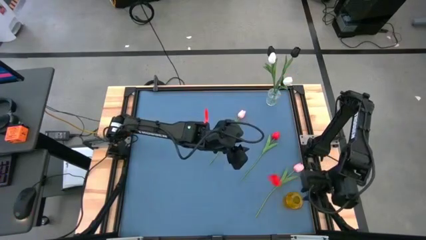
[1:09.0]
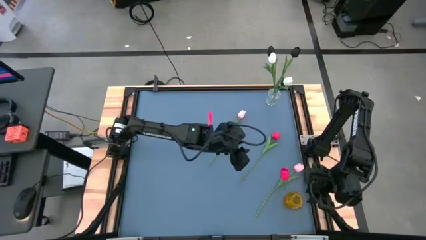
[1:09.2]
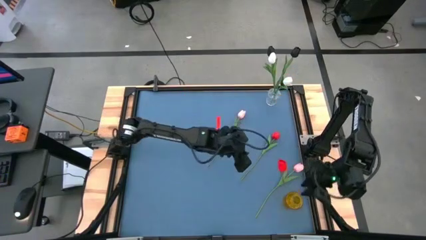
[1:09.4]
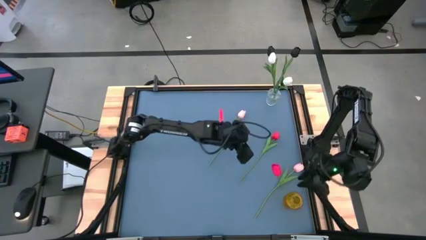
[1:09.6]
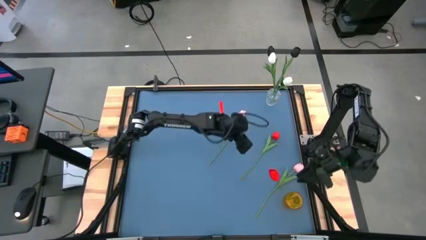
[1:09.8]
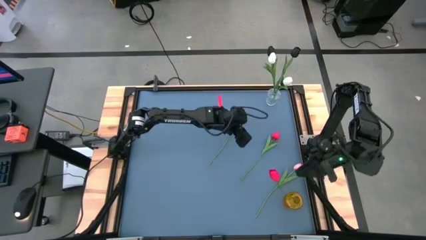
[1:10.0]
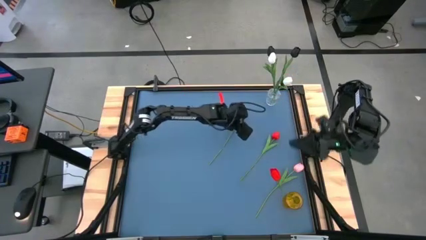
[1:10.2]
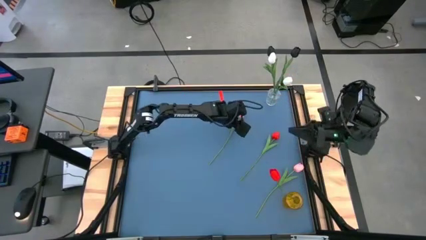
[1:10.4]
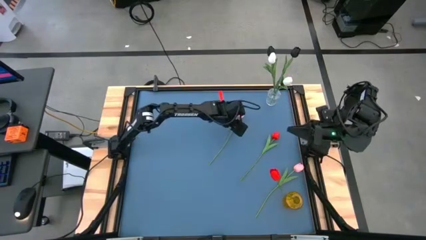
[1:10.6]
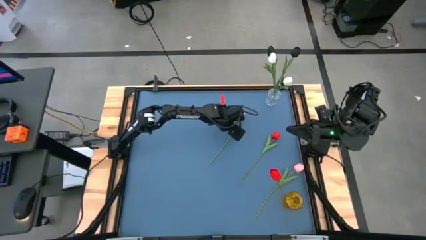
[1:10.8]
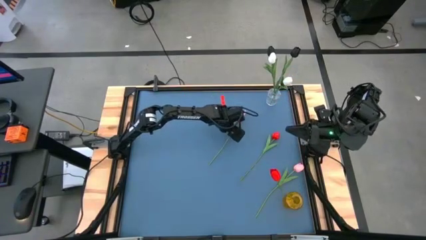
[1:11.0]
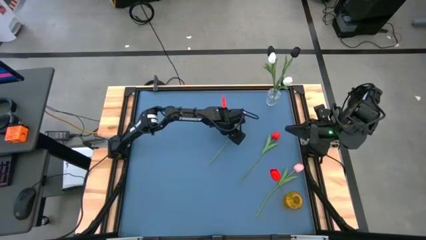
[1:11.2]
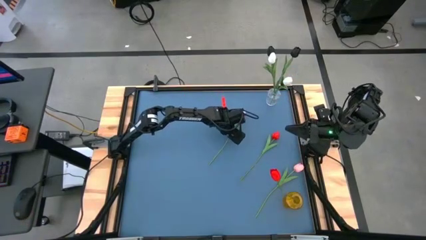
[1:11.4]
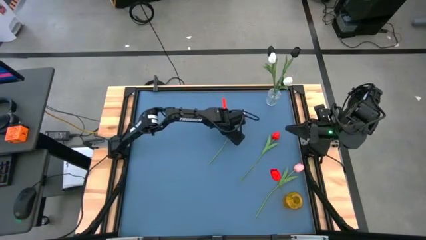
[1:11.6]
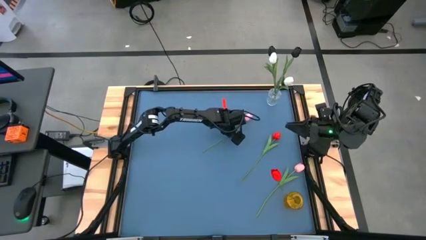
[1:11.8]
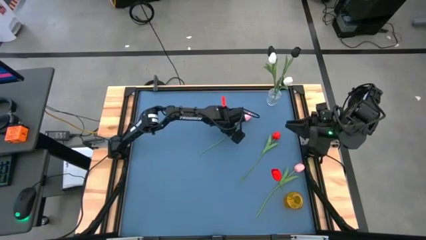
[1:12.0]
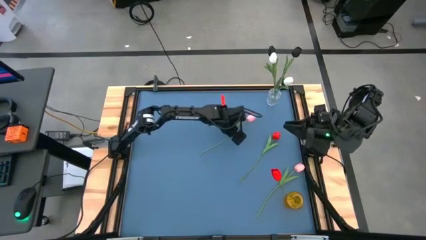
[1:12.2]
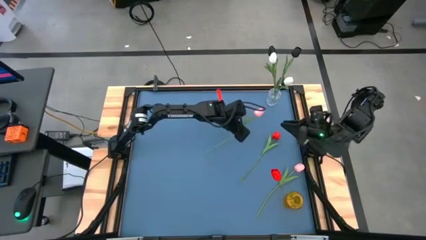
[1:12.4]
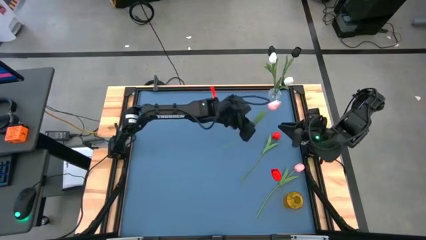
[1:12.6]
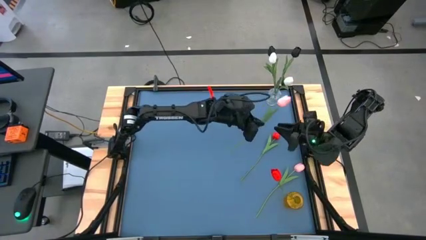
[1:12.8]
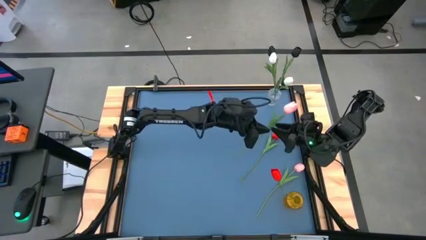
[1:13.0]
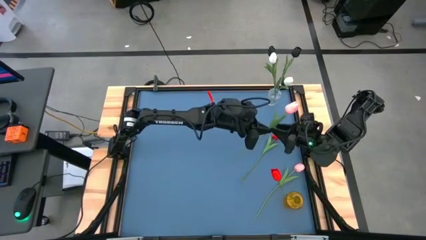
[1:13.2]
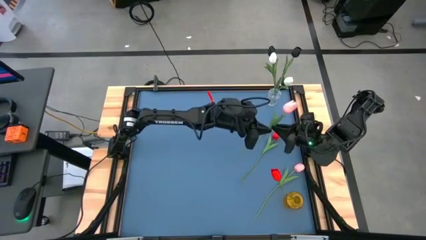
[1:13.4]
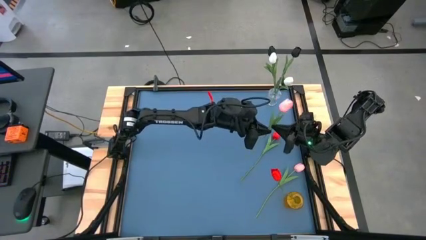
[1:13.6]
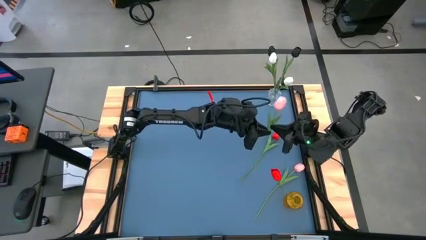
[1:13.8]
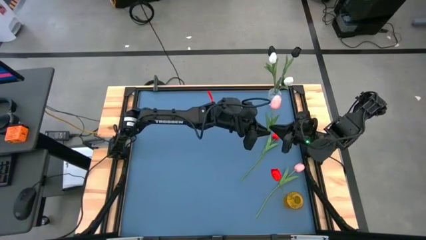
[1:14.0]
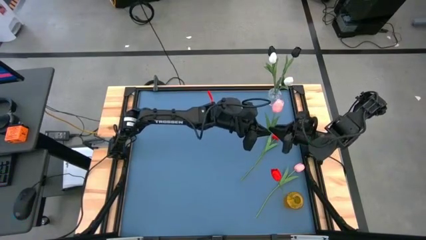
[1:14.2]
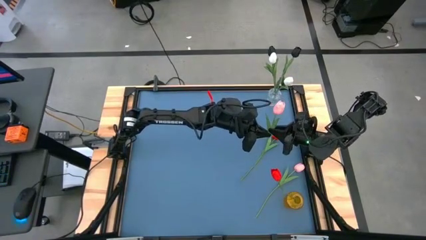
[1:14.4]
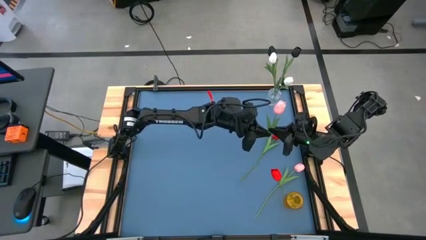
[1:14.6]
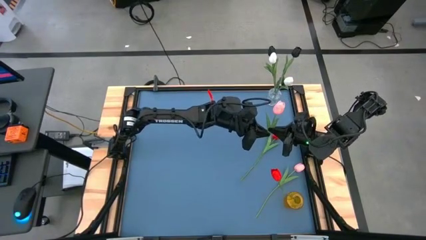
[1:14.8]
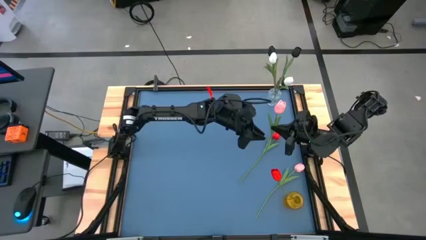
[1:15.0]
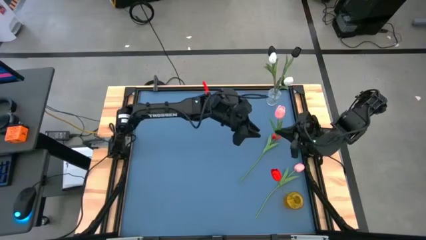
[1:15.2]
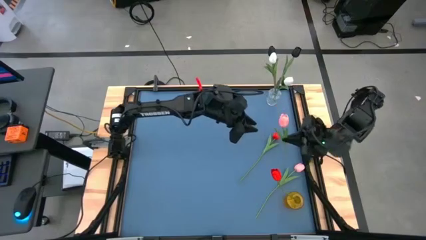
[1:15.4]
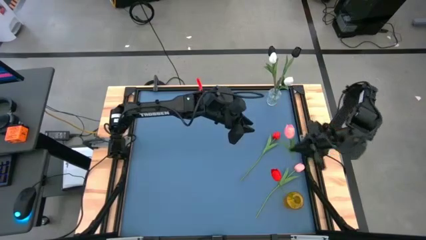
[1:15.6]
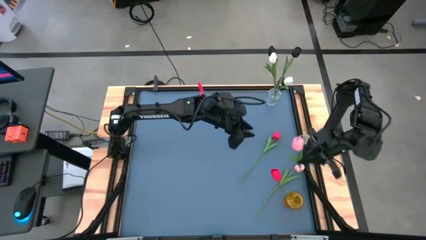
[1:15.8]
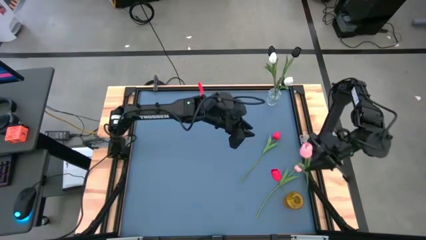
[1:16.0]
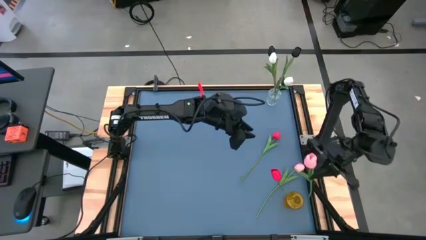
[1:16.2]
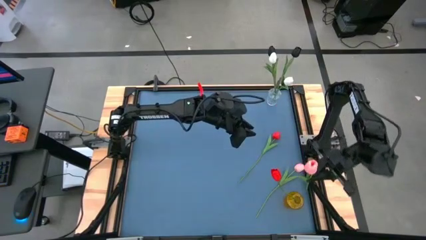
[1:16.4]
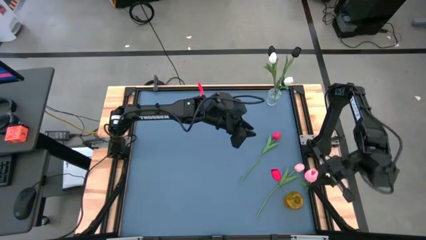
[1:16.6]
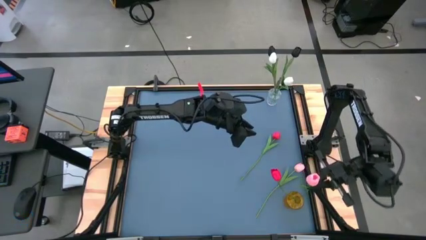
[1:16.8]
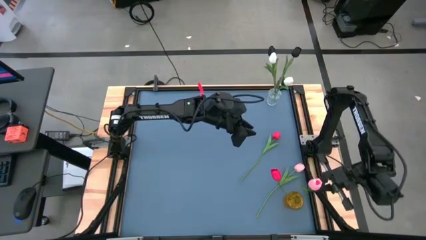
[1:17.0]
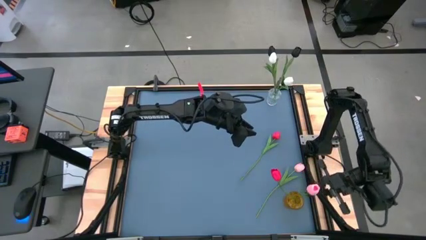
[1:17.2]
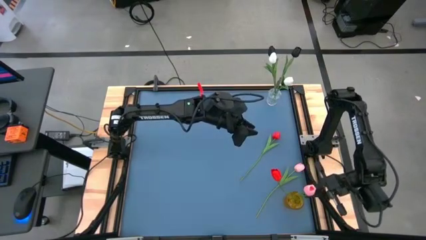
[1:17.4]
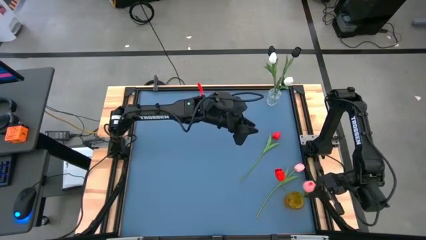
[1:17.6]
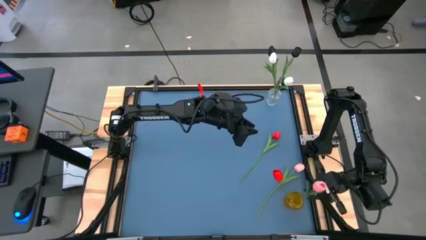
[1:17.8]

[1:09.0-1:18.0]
Task: Sort flowers into vase by color
Put the top pink flower into the yellow vase

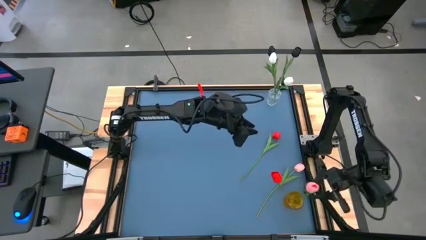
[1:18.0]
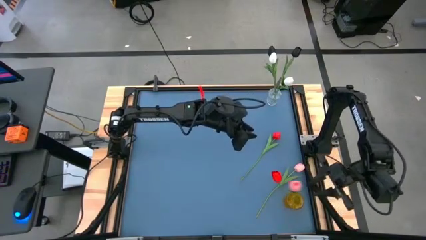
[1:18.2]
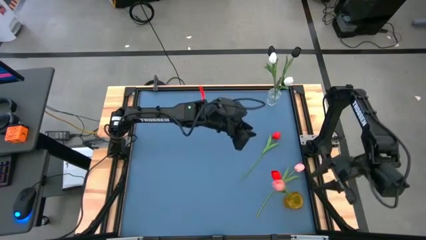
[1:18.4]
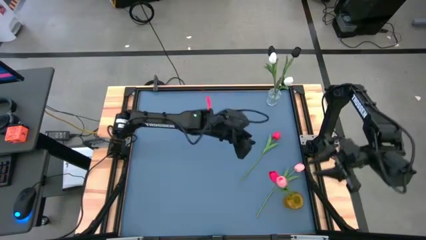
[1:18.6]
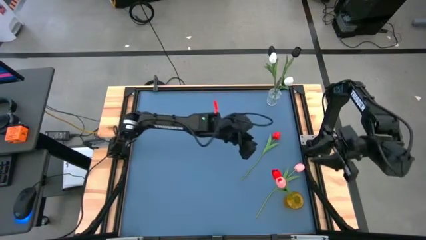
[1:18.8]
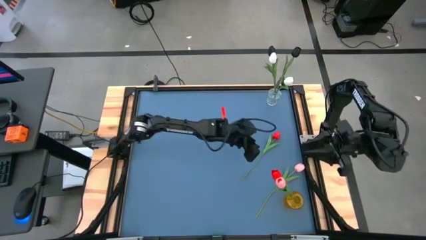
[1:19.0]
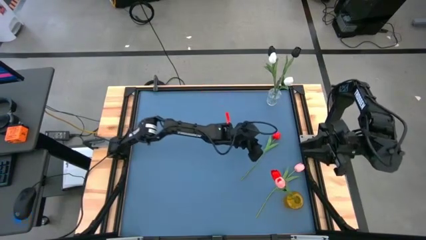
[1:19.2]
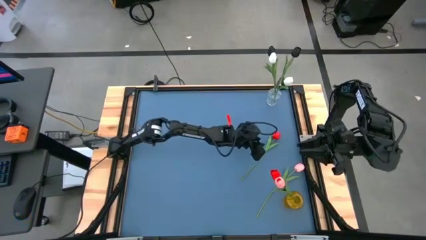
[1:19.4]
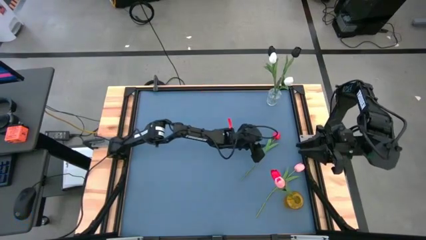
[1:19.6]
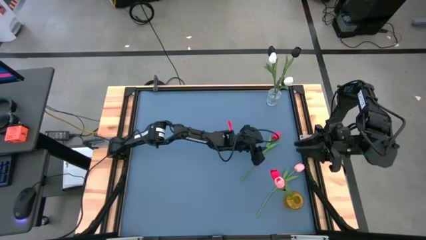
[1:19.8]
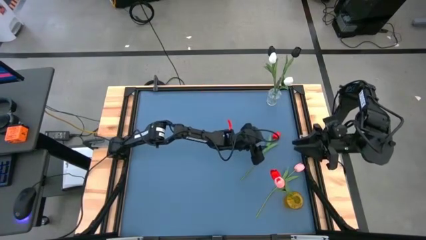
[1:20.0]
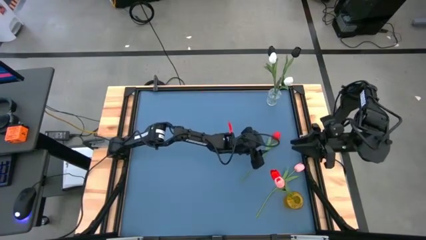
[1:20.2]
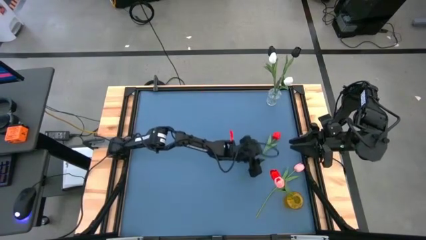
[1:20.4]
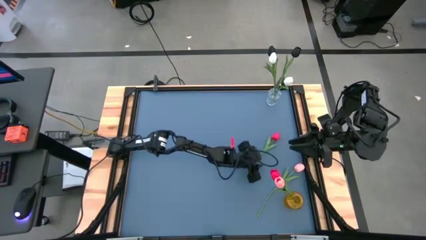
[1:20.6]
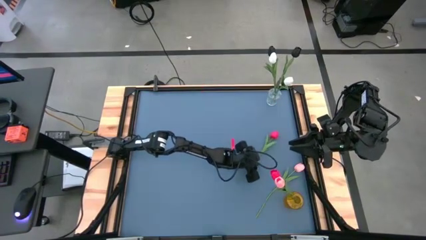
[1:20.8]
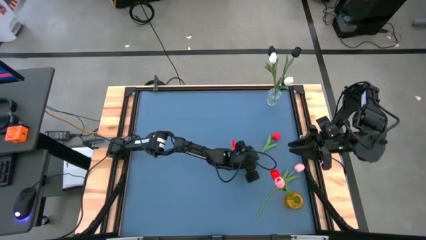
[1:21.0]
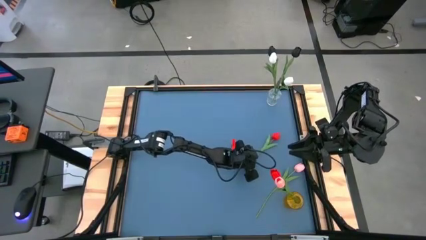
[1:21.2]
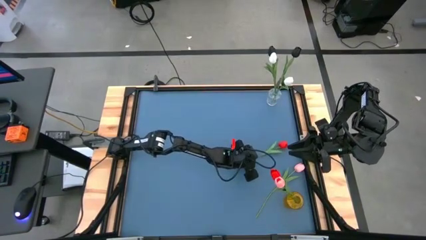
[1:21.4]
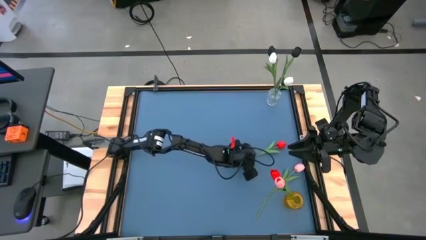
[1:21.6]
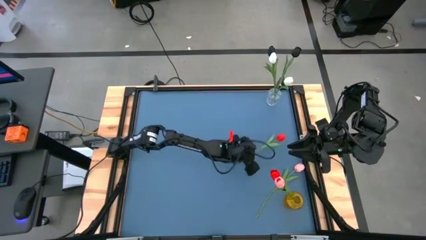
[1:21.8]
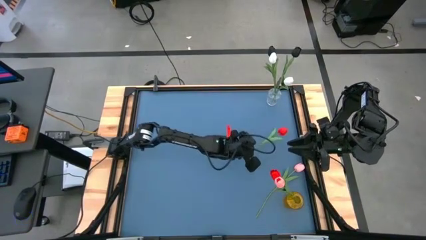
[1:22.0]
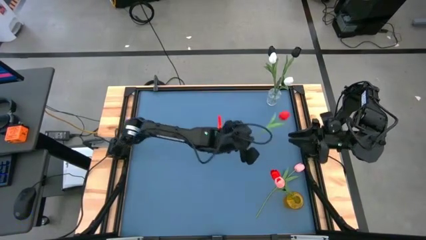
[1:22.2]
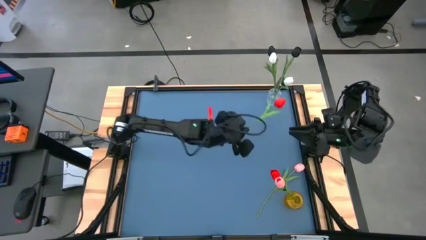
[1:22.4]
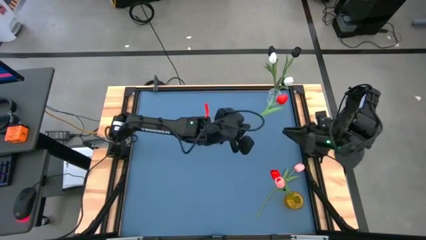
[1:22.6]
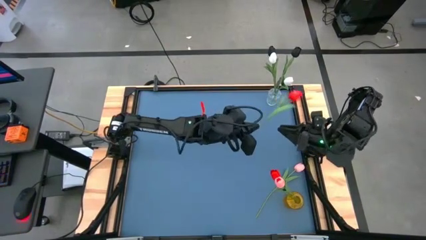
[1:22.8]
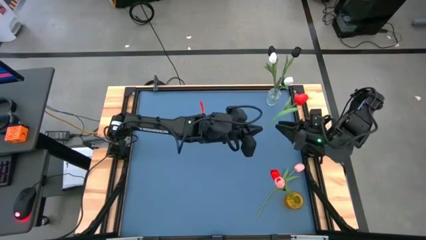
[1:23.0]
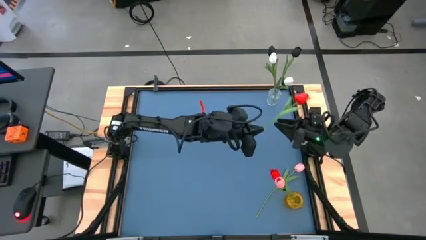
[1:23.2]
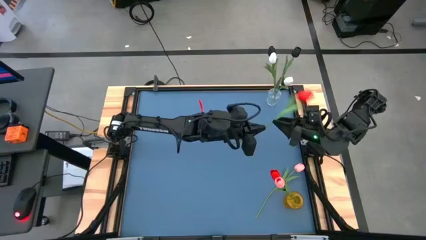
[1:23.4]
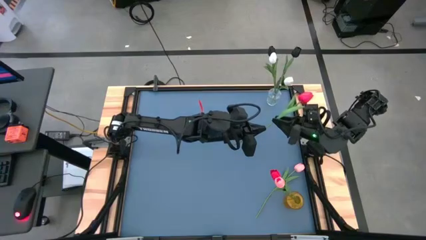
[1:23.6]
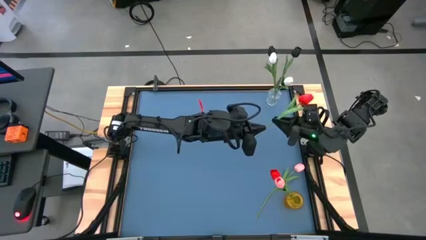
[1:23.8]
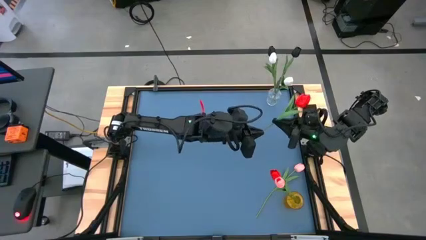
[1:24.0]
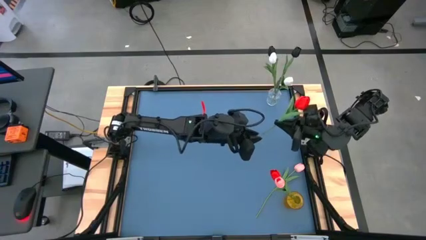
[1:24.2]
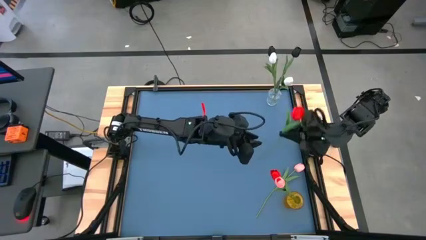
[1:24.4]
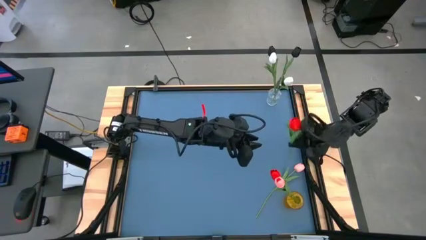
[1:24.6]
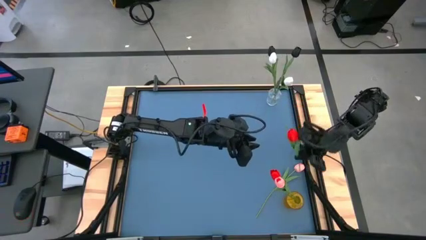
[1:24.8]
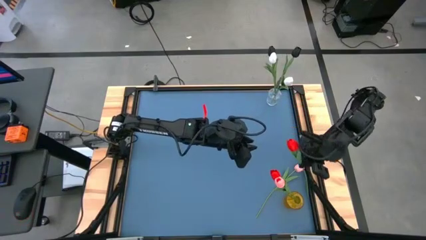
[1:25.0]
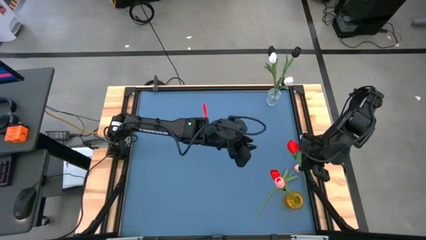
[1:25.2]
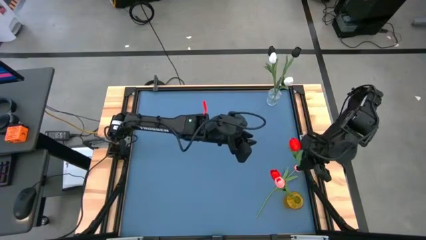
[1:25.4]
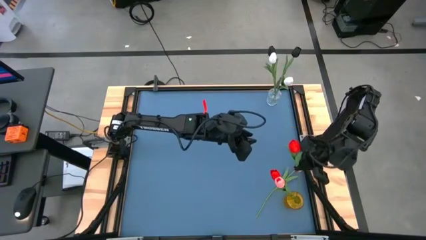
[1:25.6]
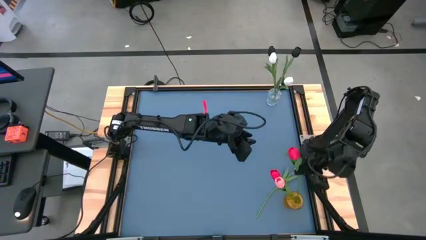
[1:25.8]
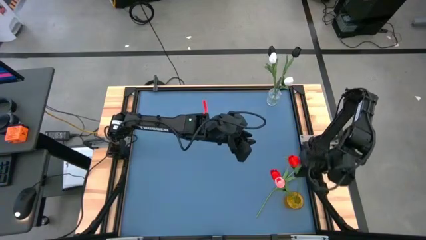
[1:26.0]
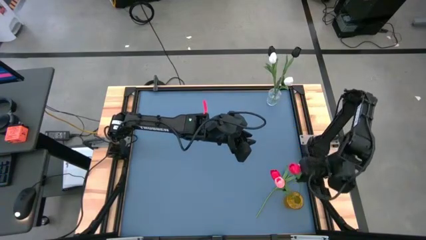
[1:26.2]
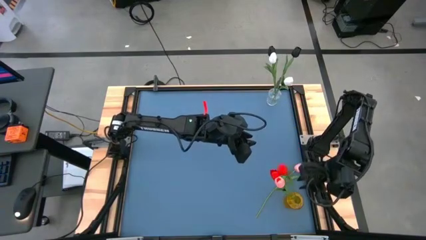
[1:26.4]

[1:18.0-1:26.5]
Put the red flower into the yellow vase
